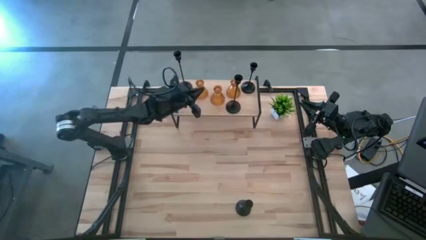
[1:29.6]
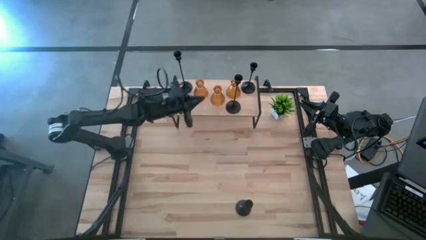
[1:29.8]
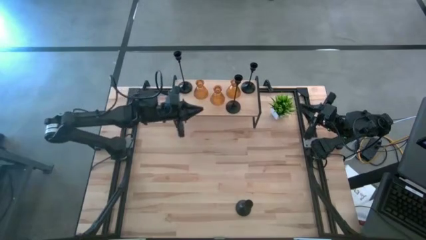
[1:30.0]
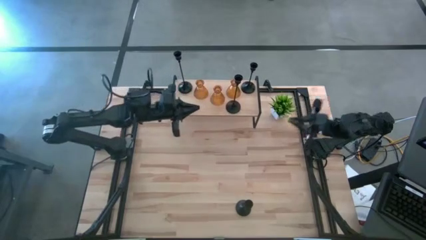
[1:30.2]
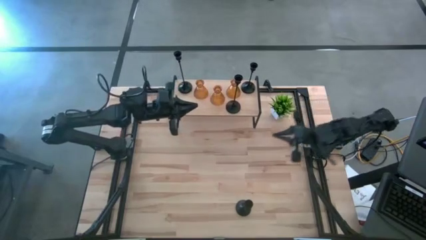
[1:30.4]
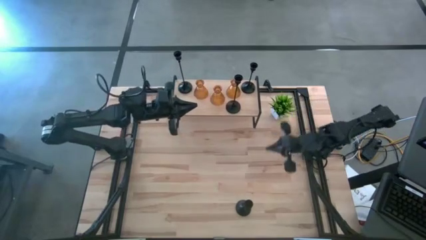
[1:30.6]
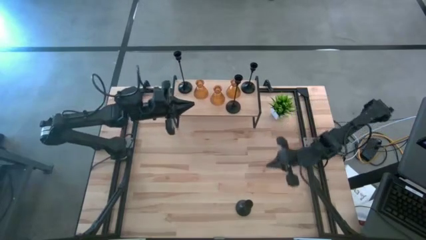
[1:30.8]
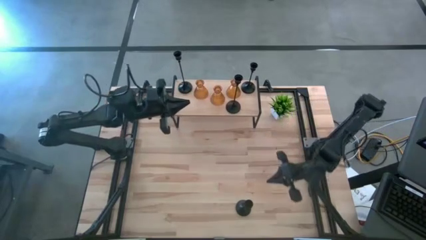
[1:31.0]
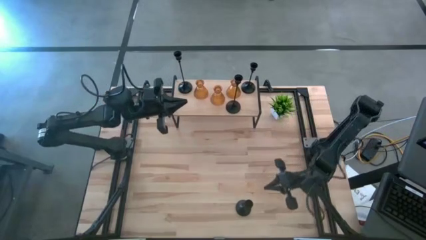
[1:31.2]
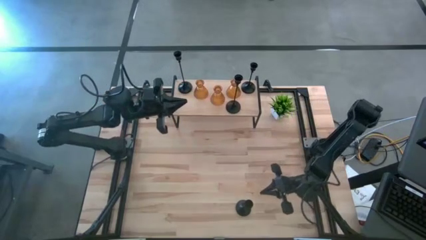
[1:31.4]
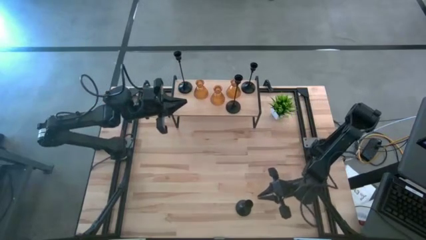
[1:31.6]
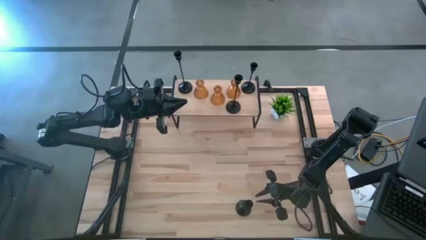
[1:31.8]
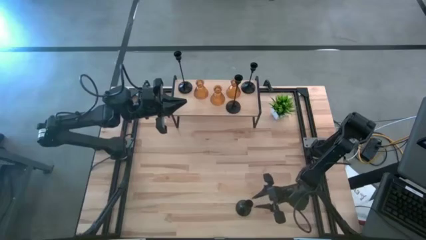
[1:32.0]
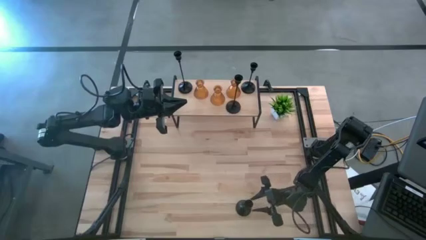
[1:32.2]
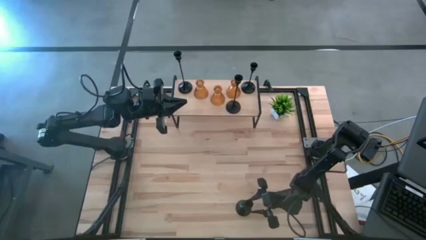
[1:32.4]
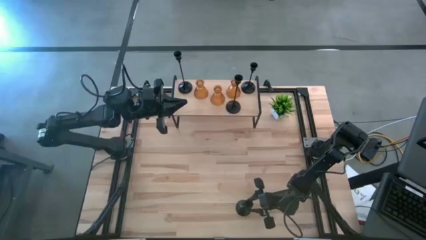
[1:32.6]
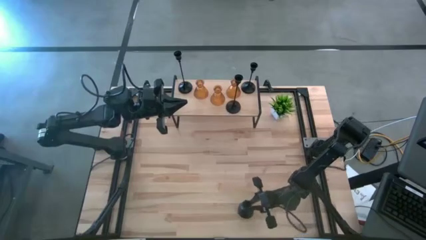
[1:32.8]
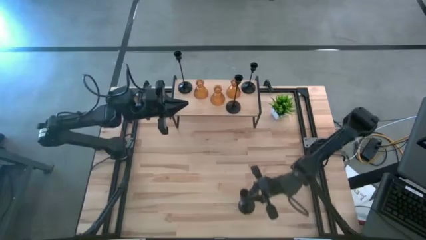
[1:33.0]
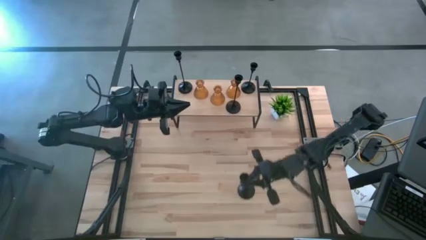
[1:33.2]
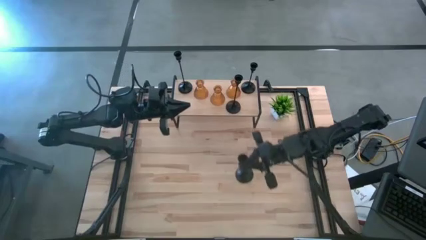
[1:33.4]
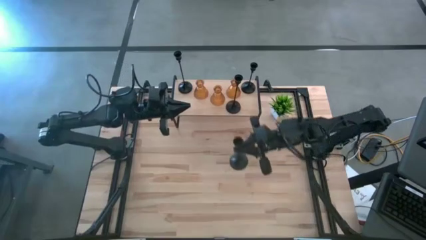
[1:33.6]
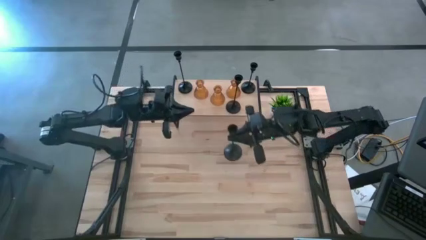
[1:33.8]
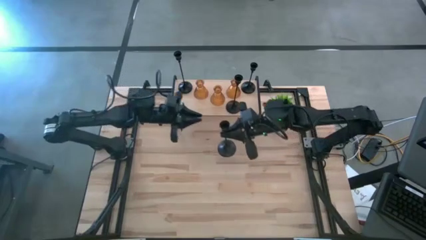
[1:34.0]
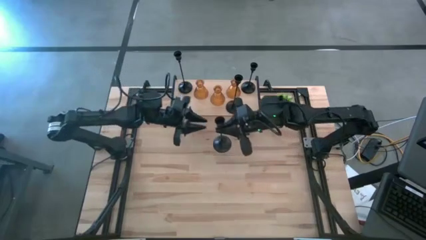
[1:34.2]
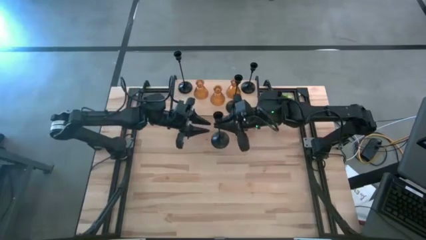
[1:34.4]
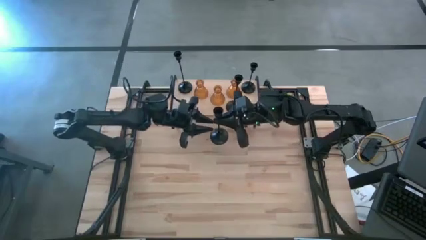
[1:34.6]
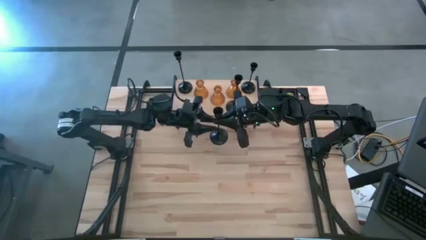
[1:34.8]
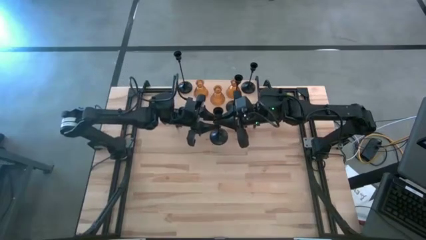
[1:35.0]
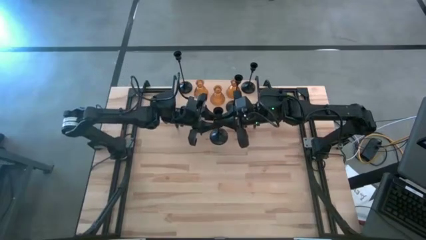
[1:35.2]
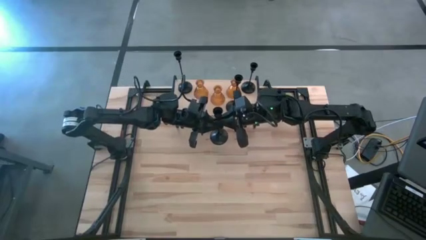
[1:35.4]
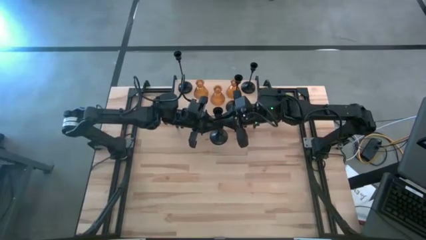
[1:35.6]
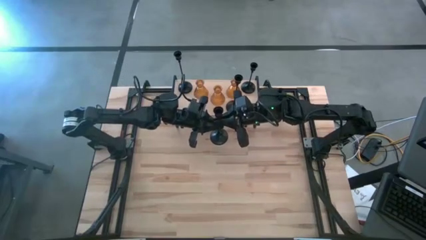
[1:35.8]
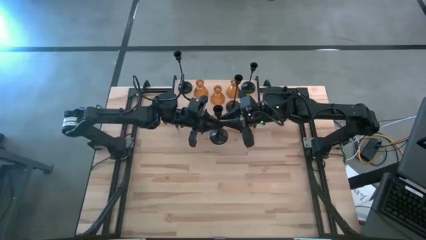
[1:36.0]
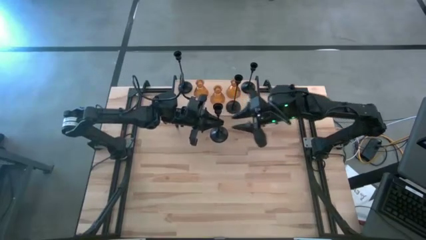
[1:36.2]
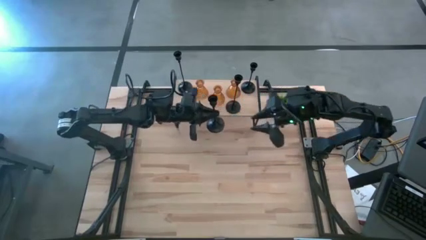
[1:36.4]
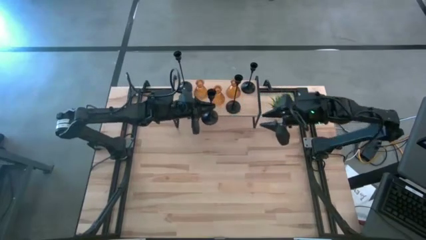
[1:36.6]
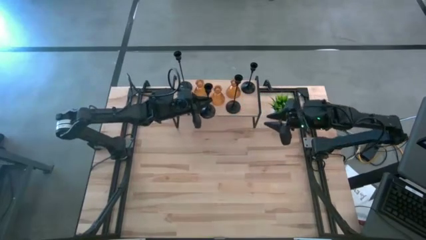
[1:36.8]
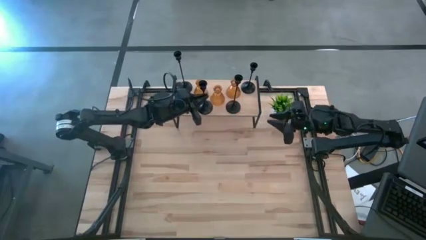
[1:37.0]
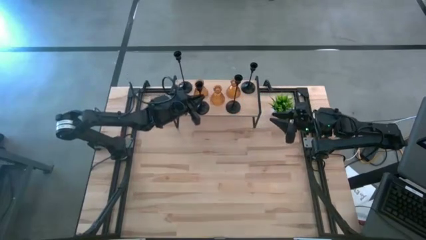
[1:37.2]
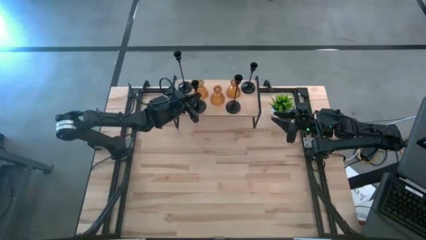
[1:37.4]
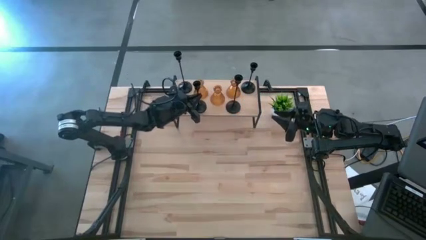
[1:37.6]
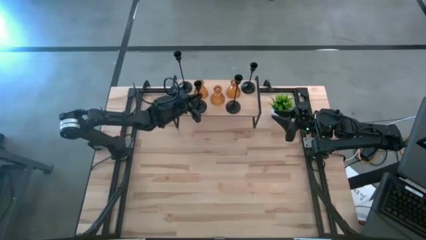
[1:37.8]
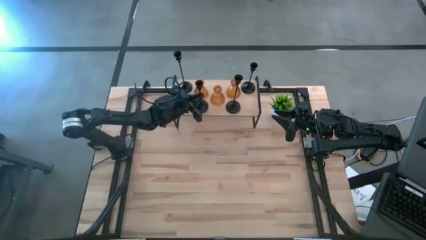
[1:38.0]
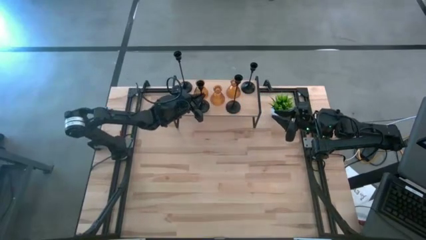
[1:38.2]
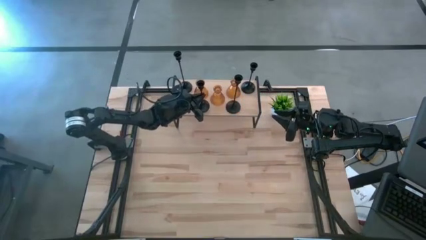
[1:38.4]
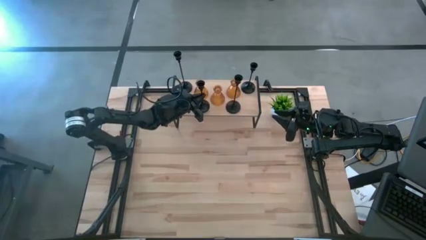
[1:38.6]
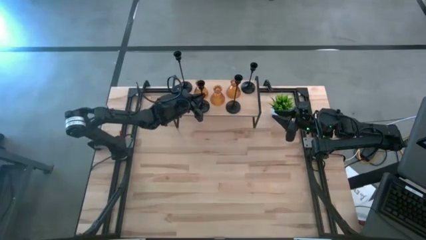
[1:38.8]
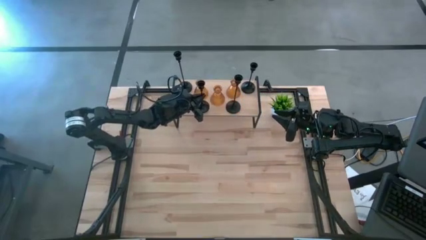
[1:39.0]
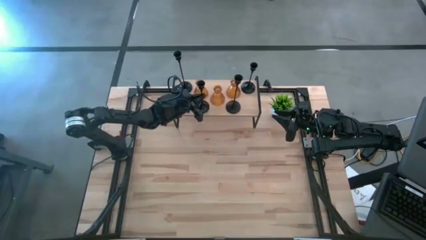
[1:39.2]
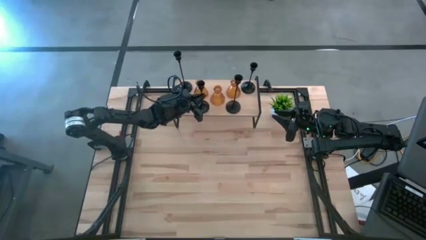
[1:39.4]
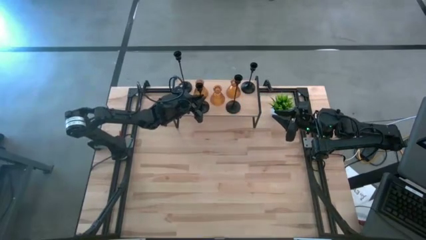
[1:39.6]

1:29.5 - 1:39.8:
Task: Pick & Place candle stick holders
Put the black candle holder on the shelf

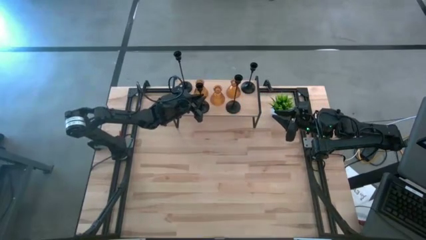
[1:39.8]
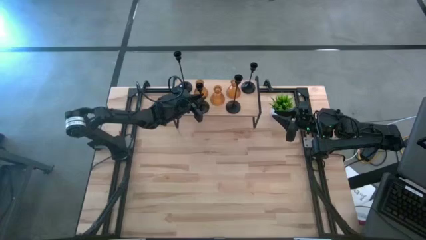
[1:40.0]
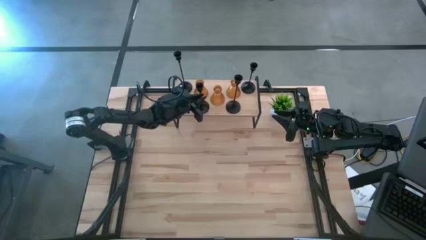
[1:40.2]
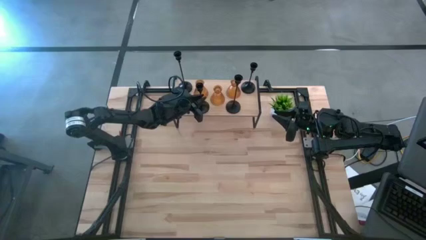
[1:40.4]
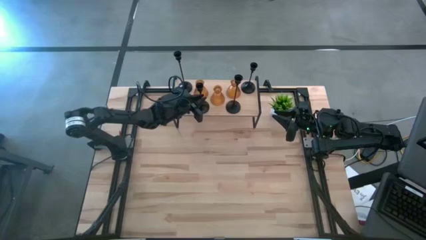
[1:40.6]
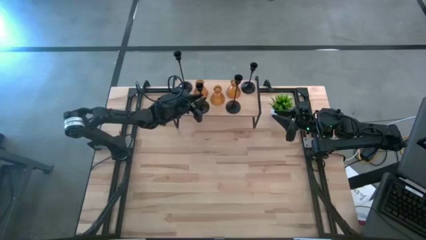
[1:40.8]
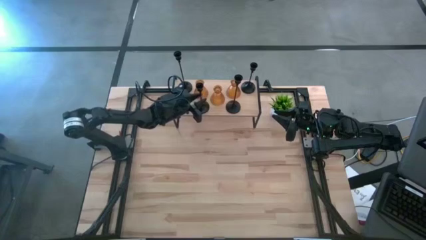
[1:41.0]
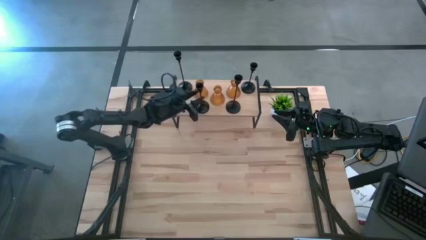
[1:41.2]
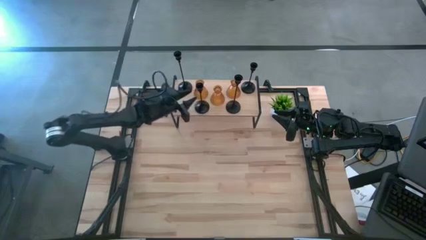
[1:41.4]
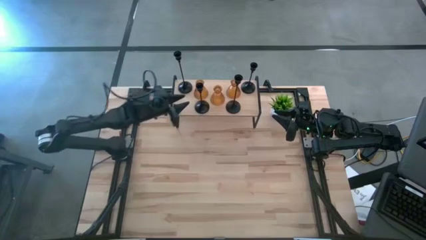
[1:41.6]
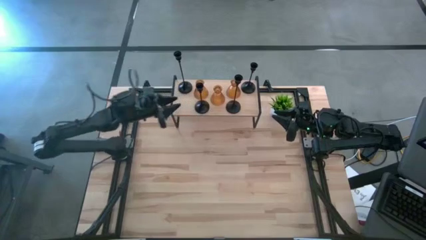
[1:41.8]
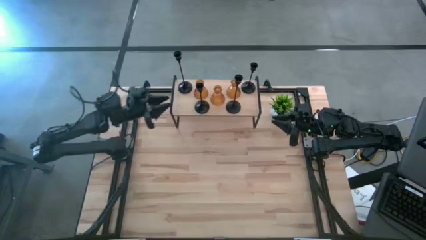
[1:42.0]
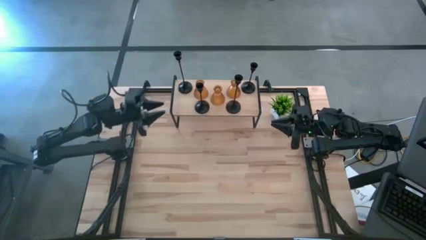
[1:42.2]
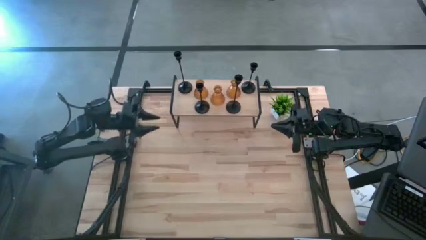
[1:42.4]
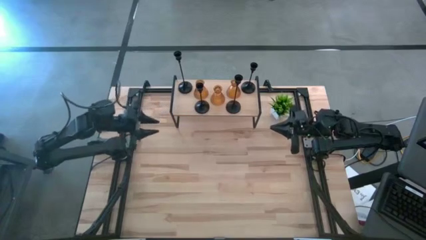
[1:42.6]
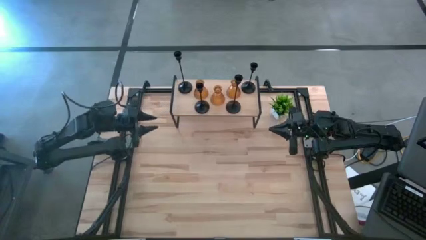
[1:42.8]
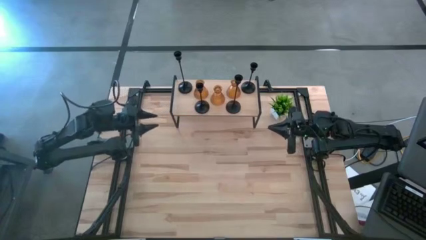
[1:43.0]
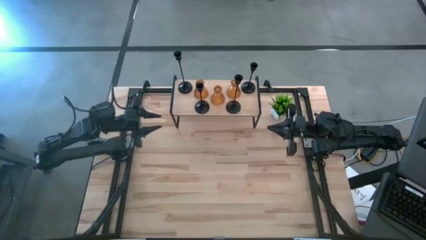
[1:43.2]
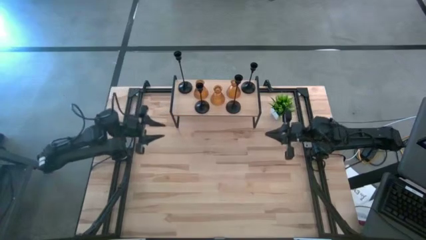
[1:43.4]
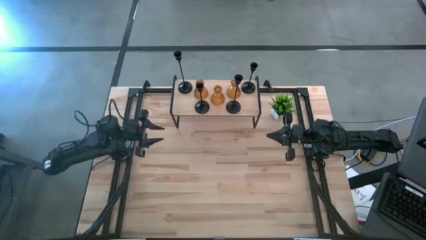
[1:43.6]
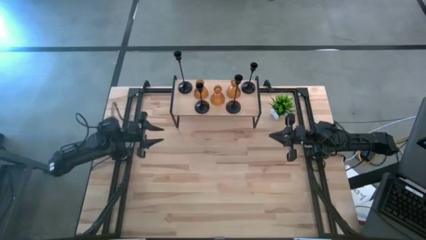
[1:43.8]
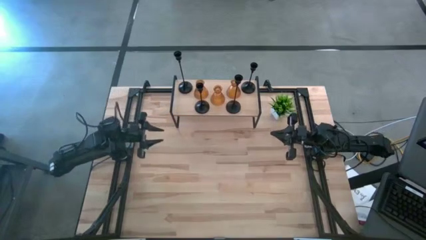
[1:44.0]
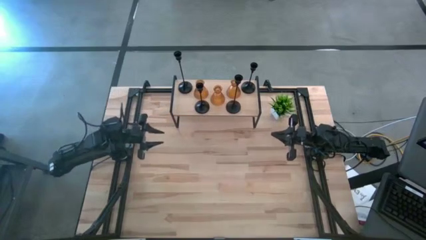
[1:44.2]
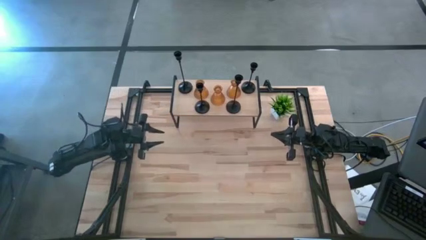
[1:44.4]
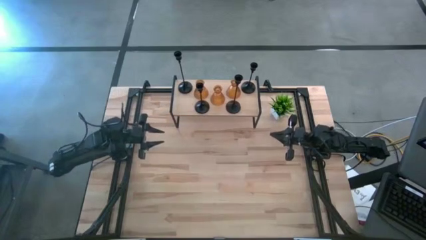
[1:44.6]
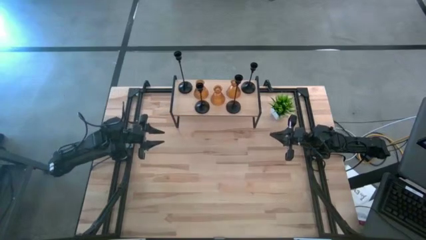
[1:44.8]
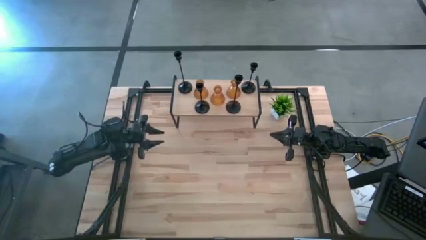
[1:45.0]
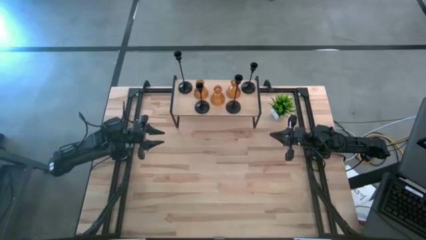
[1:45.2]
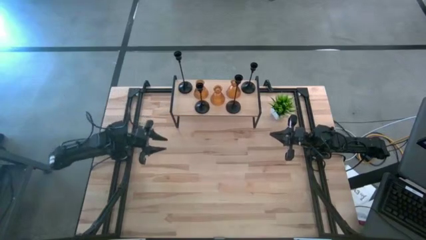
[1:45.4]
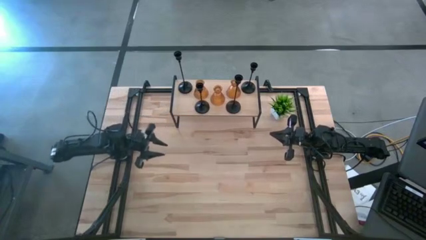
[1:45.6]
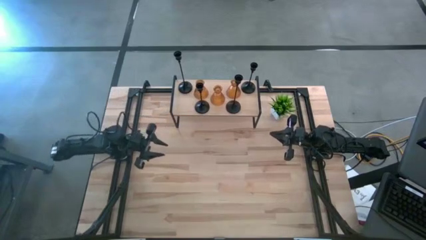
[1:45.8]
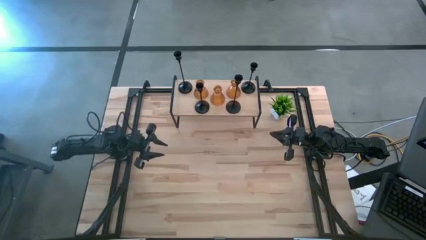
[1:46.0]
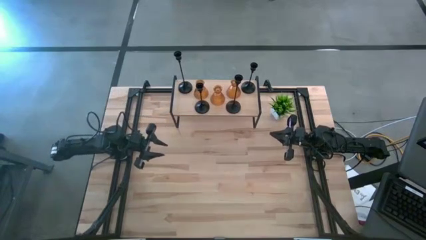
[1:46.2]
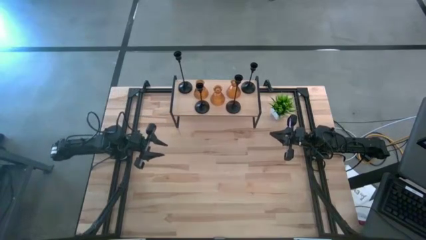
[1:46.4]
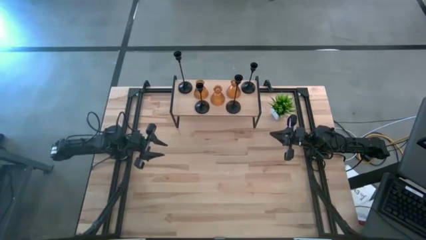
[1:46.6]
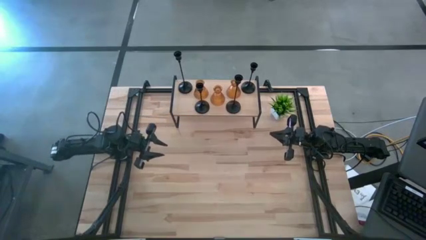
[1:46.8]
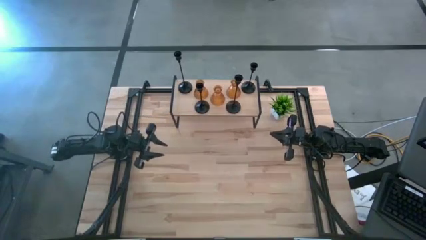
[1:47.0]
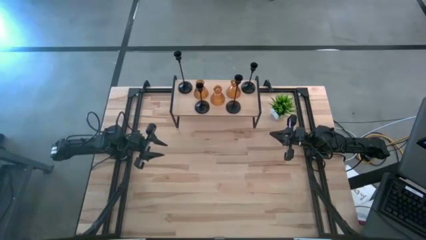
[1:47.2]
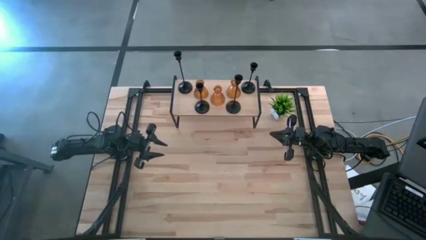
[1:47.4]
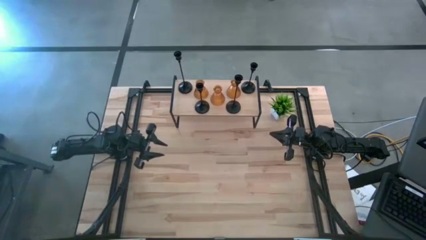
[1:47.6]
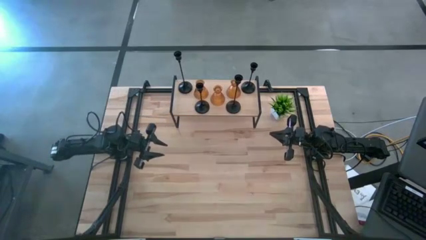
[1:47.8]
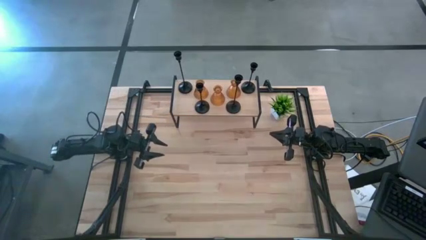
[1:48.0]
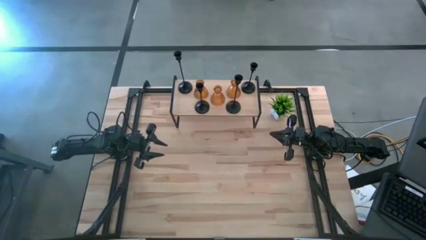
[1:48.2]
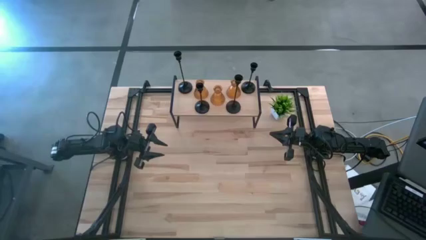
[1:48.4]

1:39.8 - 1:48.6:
Return to Home Position
